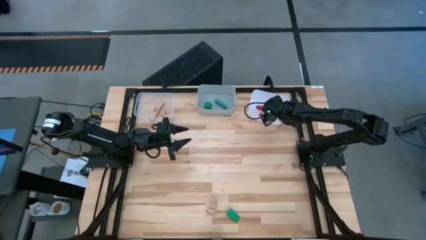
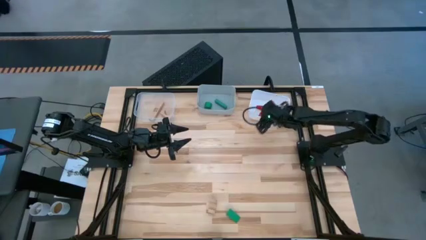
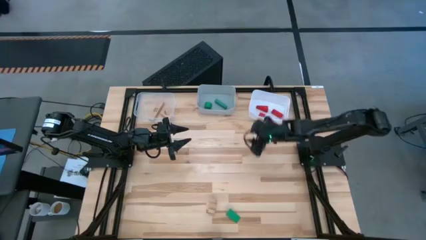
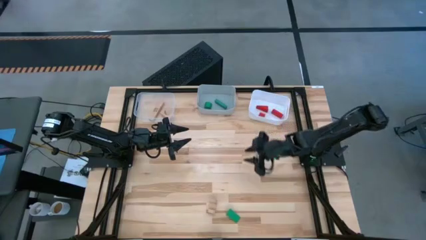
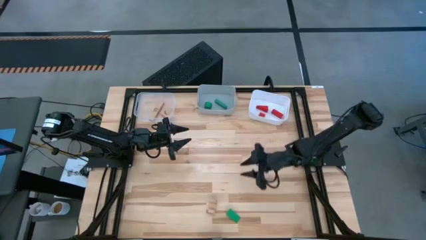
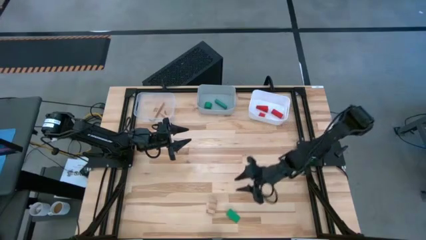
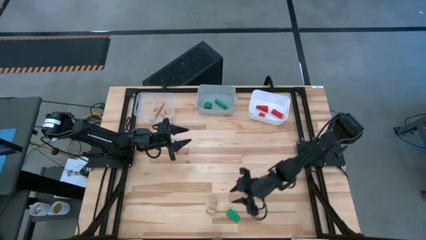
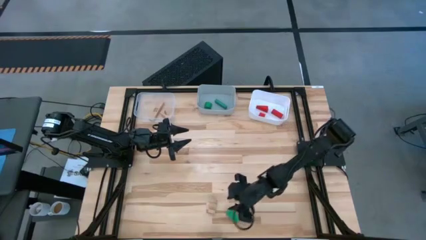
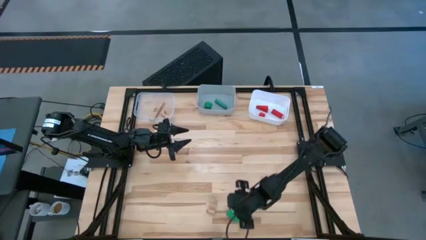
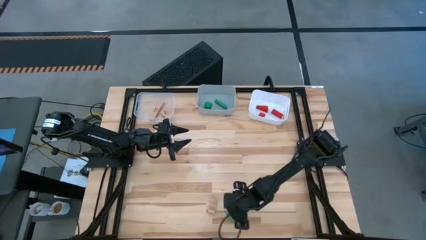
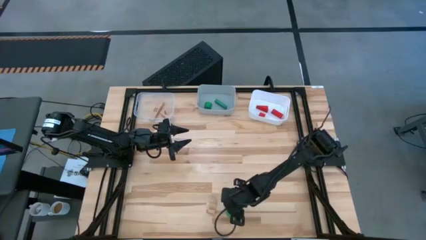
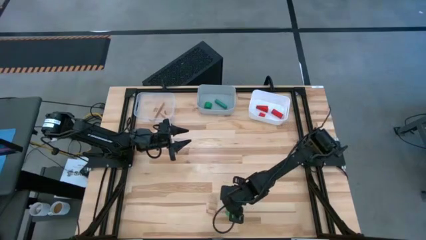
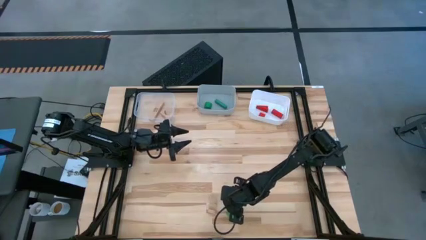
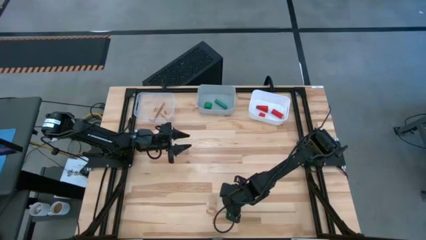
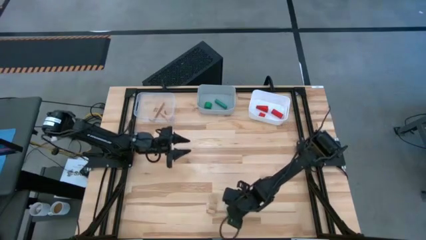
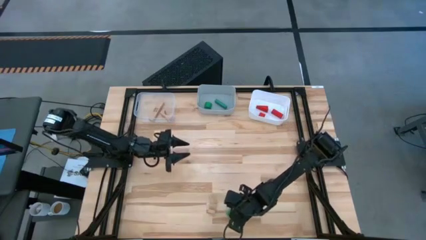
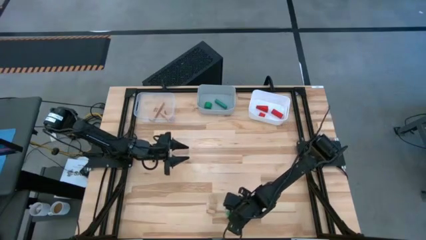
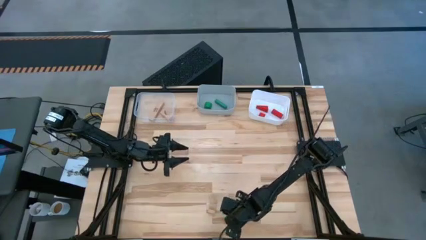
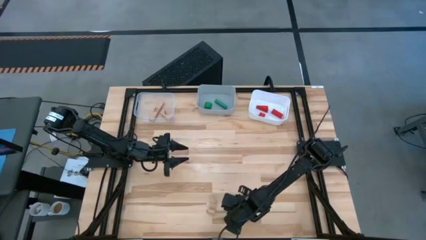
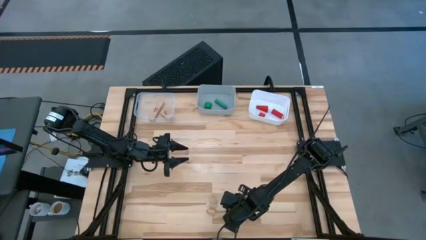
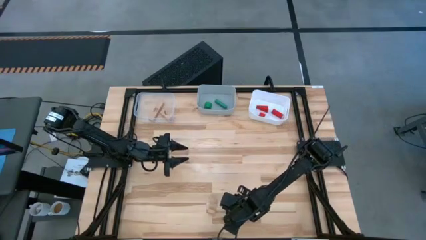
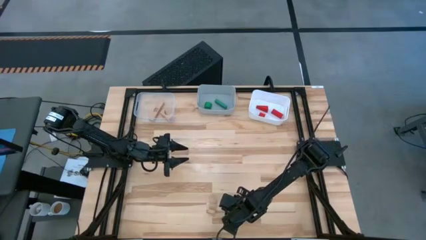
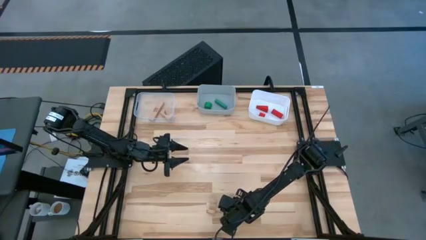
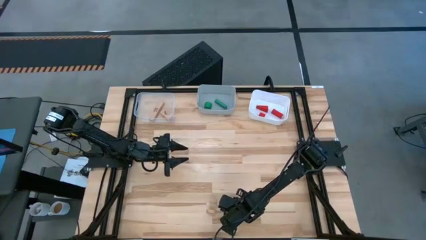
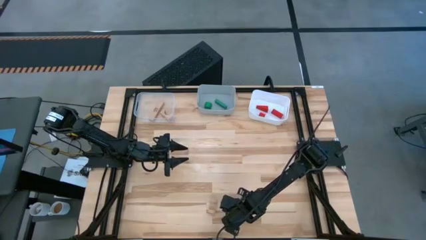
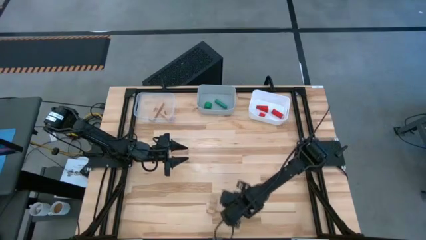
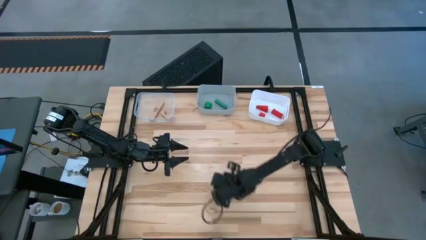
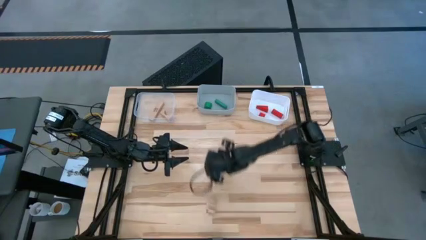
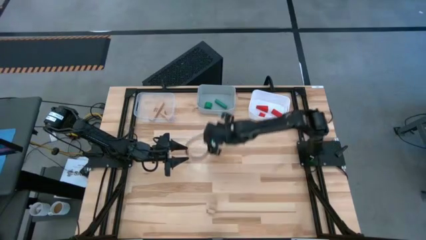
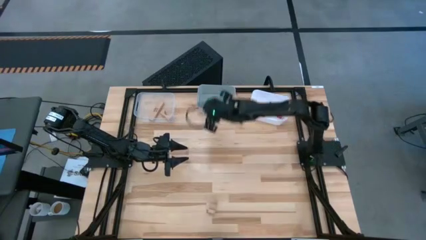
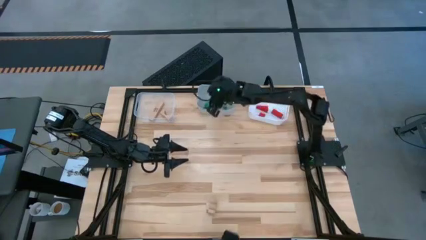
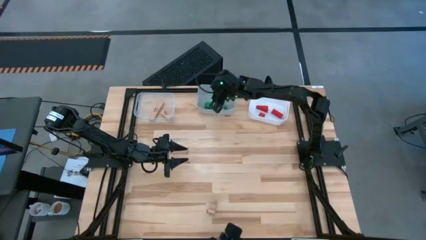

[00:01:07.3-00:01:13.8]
Task: Sort & place blocks by color
Put the green block into the gray bin

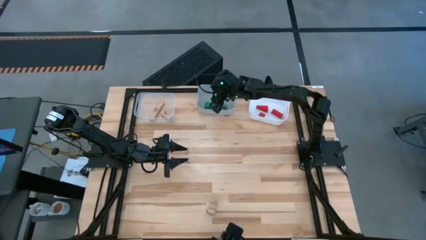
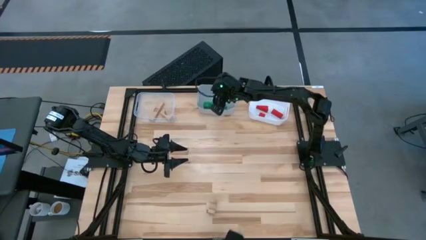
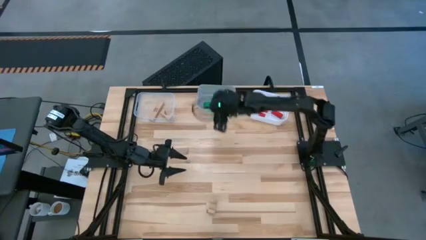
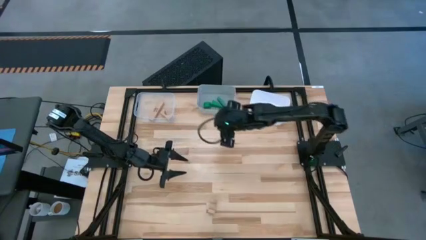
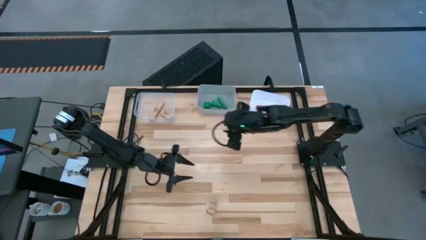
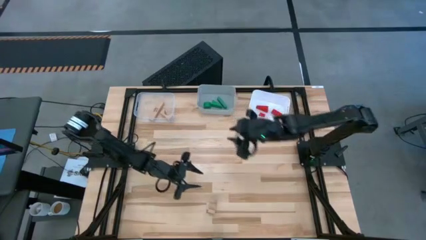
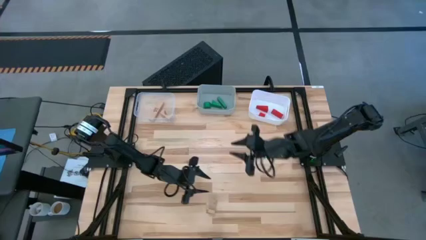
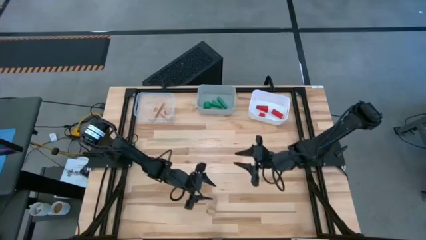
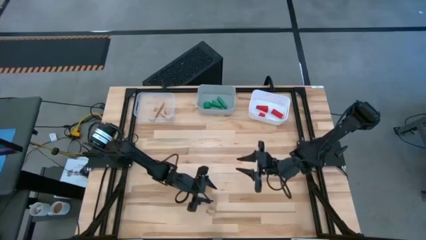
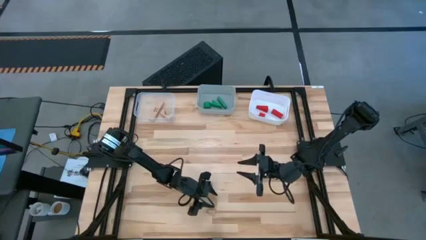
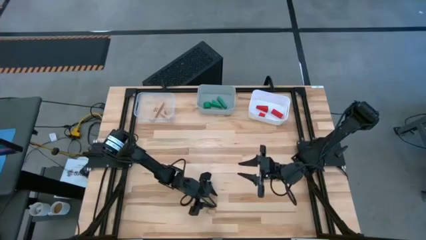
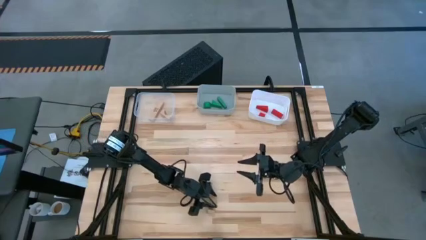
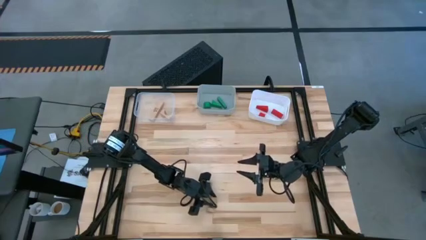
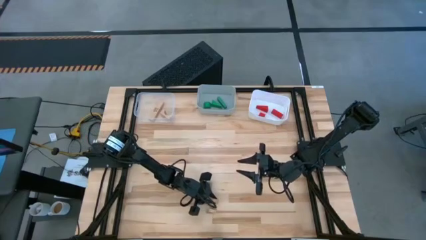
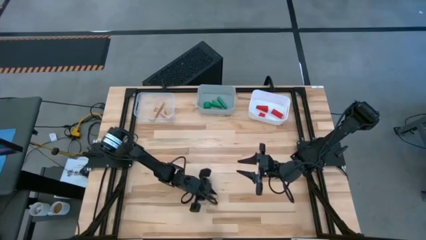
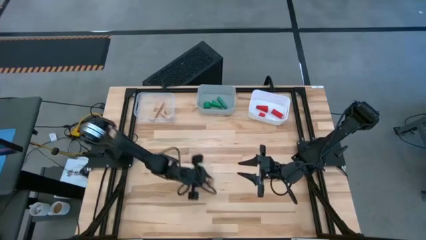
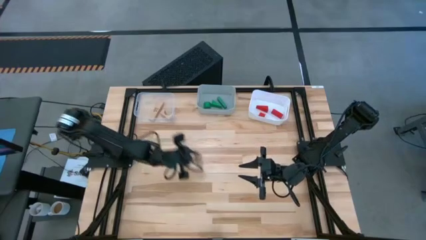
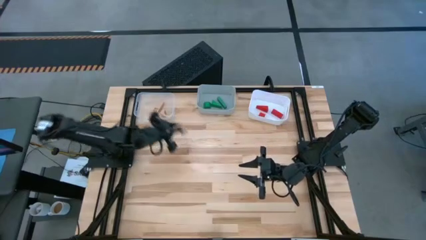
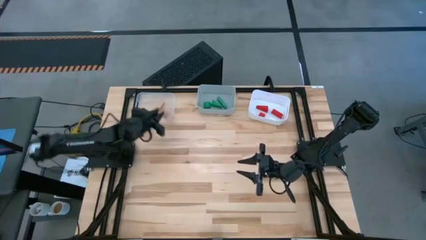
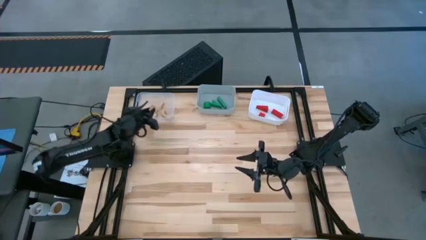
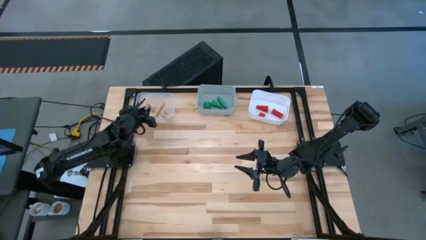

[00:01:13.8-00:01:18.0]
Put the brown block into the transparent bin

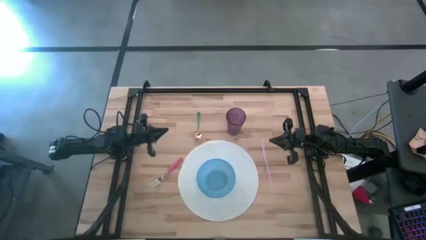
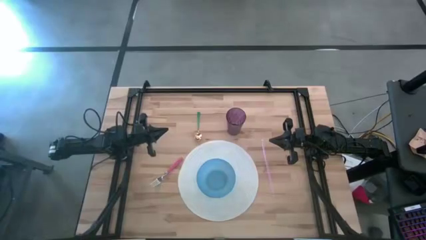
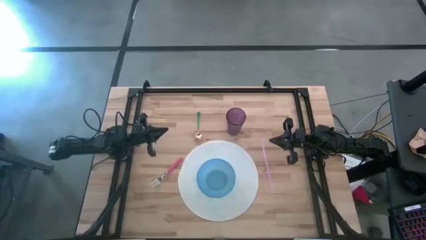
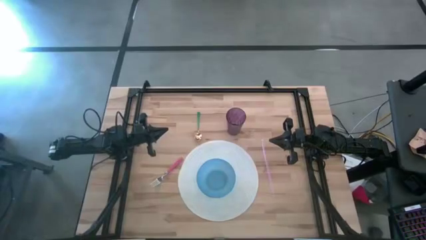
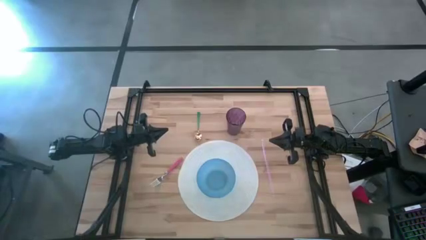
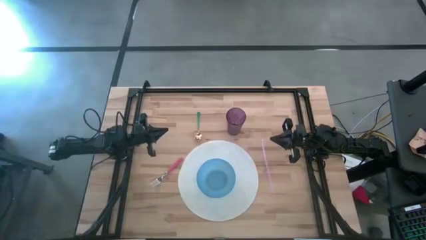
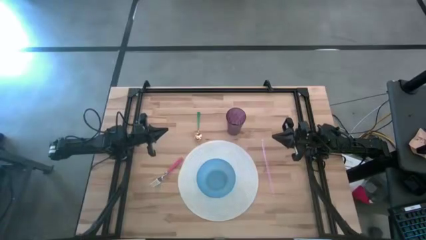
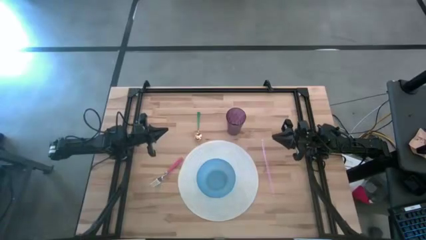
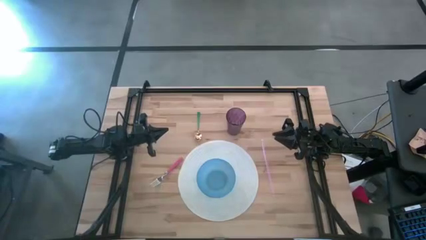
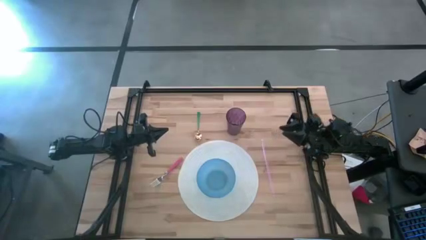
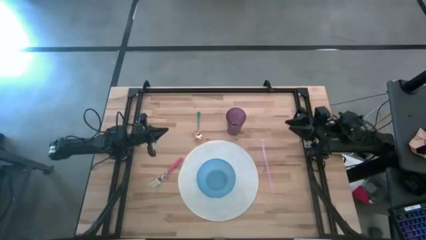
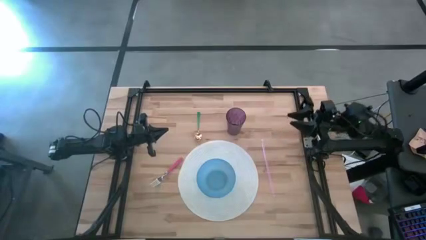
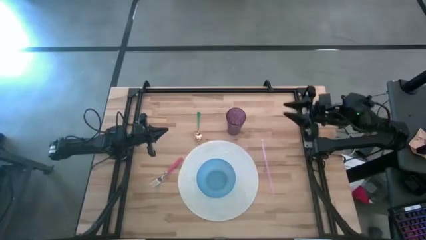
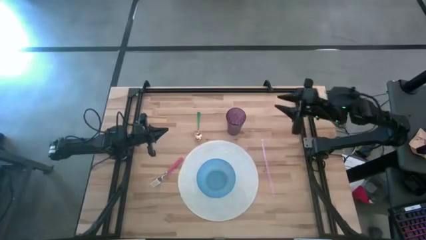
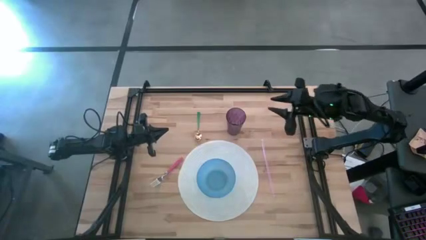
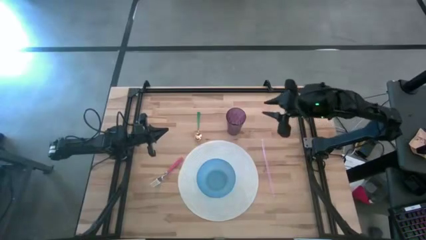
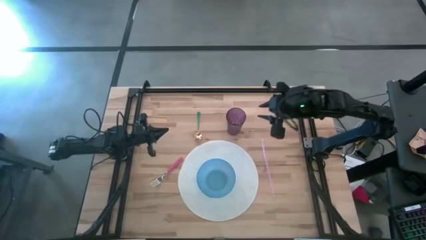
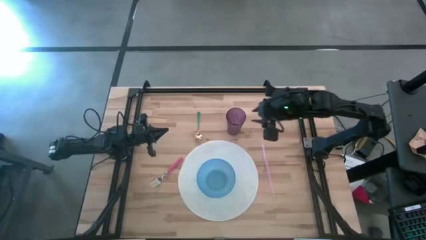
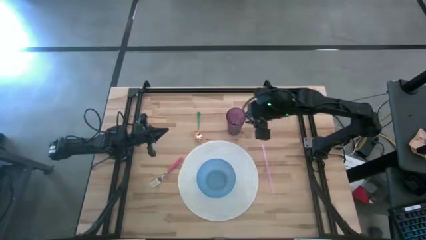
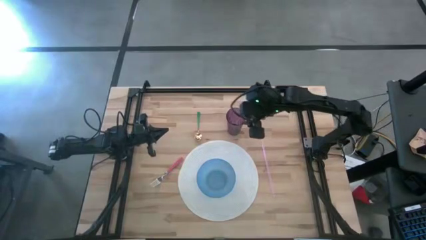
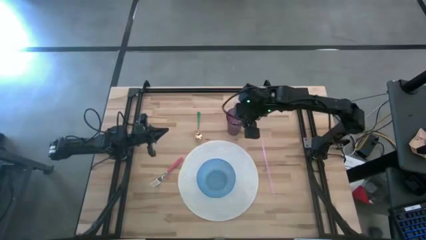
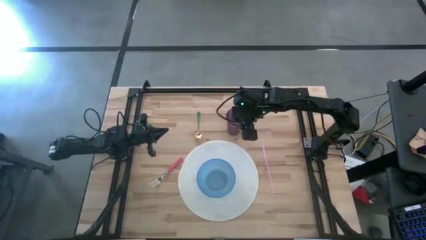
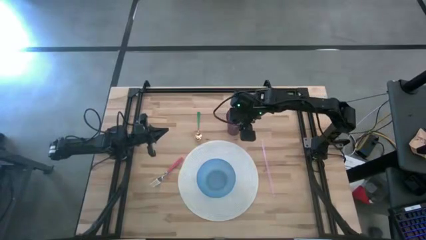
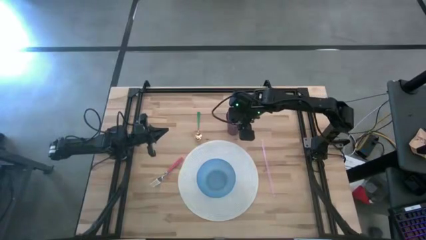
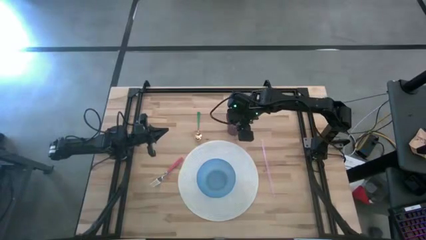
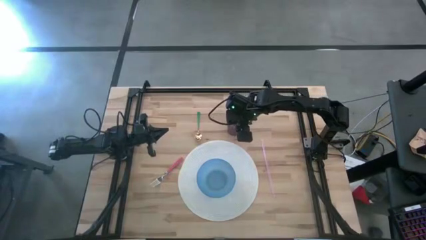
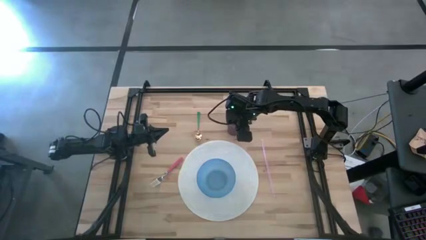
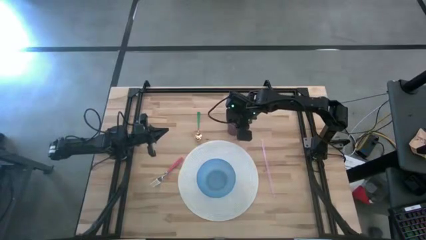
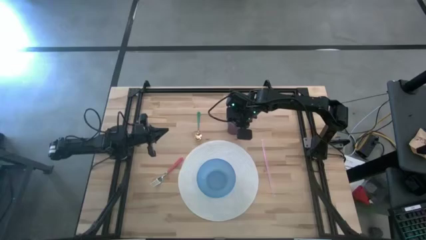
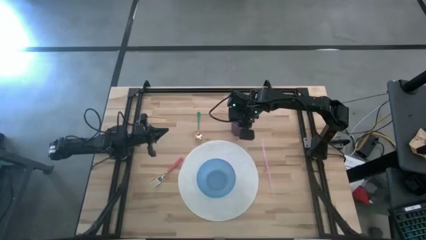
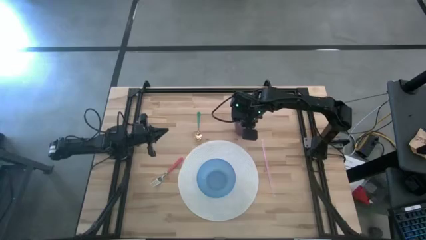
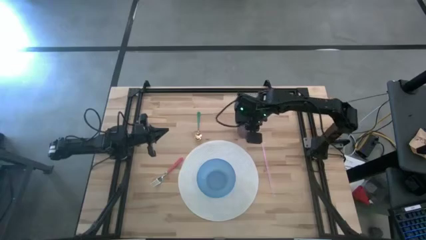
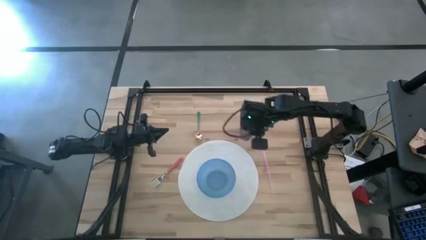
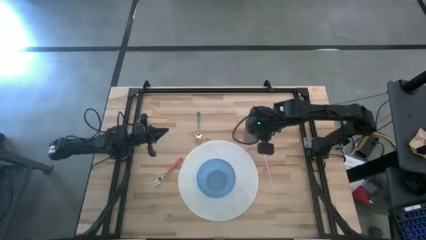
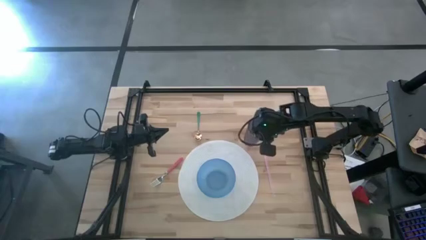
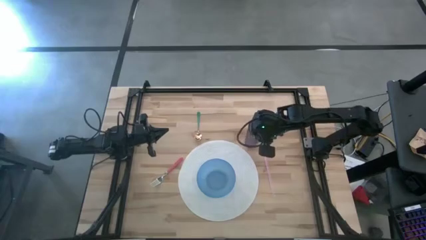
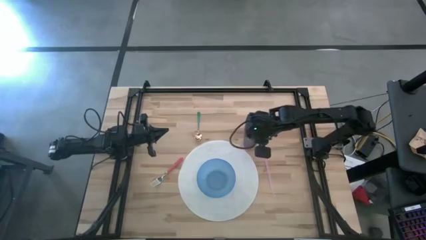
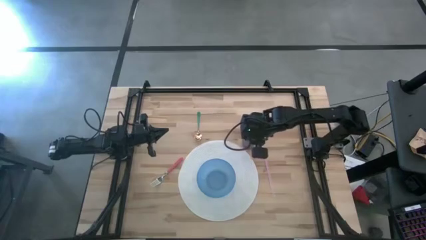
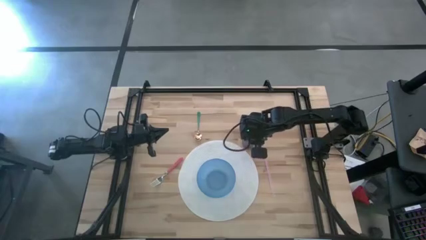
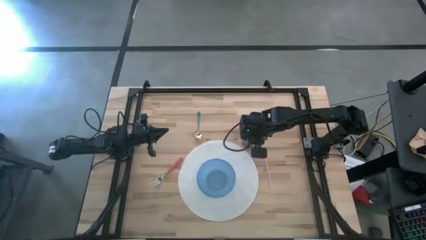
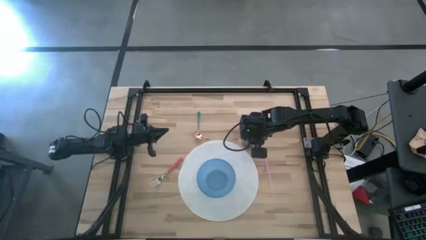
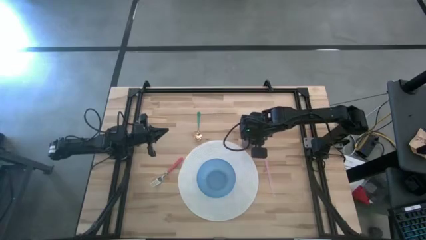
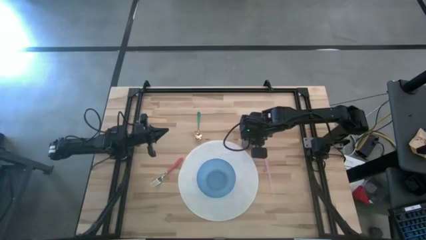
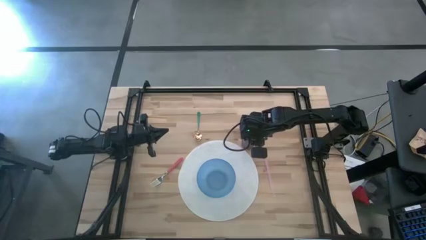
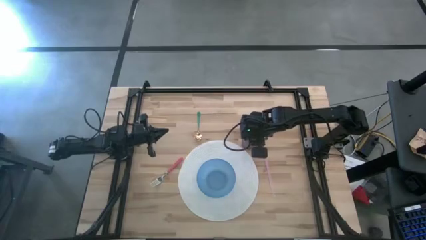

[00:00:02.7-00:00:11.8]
Task: Pick & Place Utensil
Adjust the purple cup at the top right of the mat
